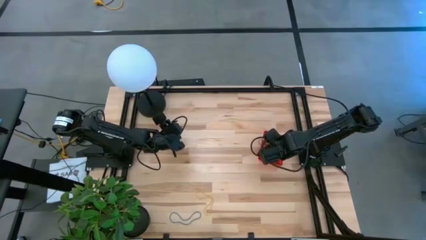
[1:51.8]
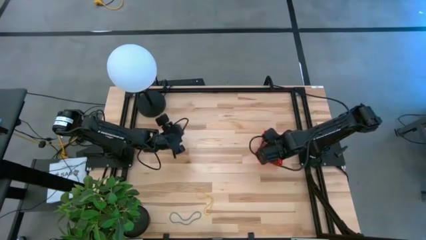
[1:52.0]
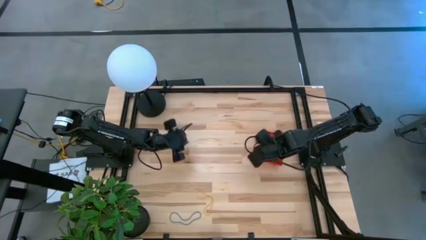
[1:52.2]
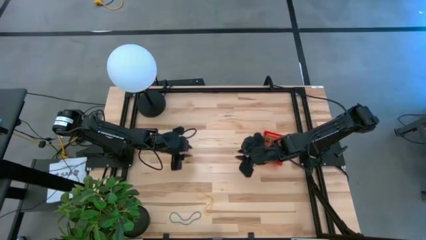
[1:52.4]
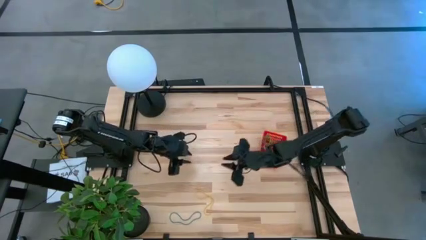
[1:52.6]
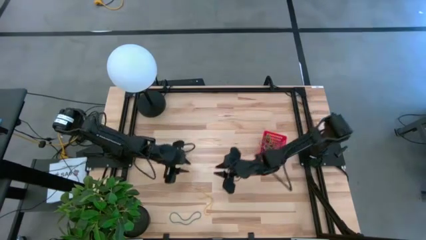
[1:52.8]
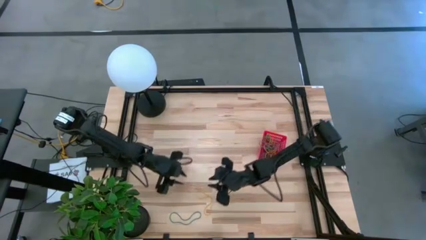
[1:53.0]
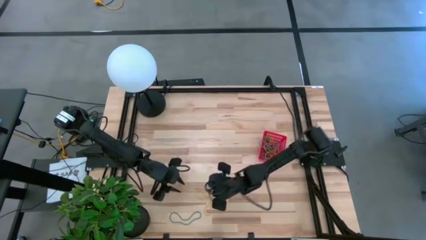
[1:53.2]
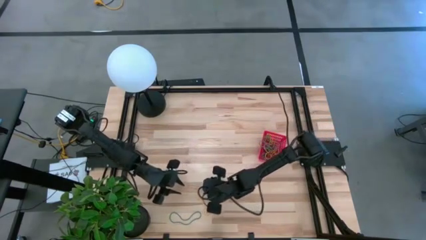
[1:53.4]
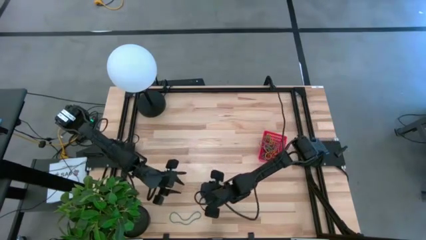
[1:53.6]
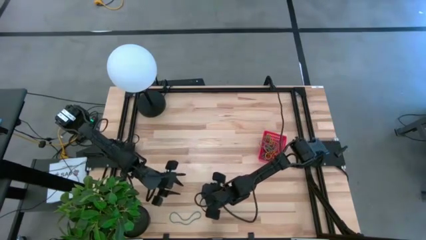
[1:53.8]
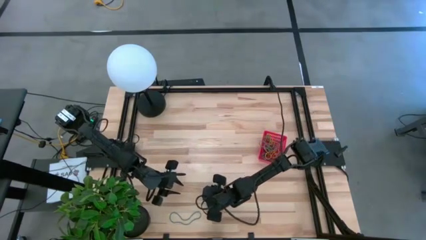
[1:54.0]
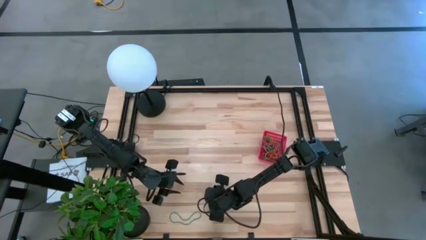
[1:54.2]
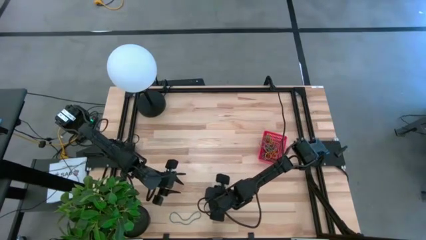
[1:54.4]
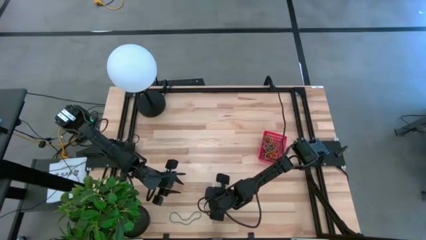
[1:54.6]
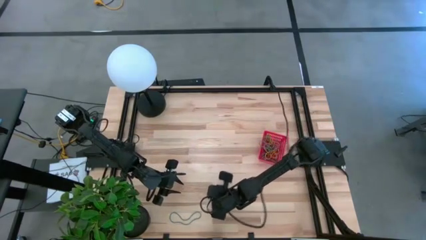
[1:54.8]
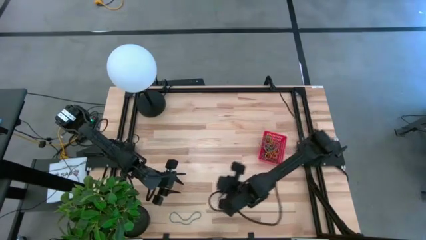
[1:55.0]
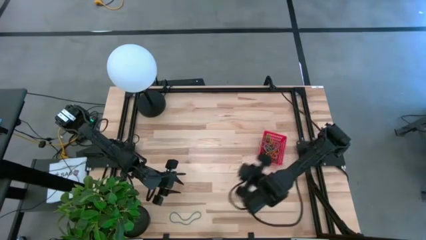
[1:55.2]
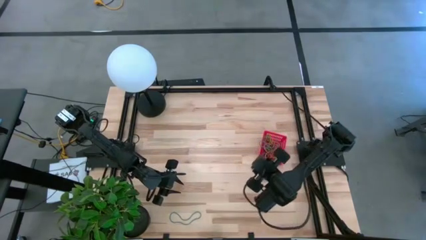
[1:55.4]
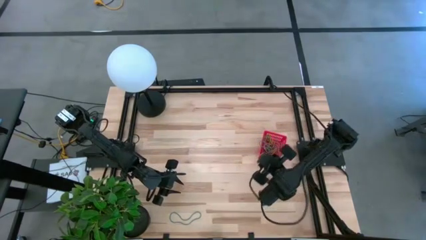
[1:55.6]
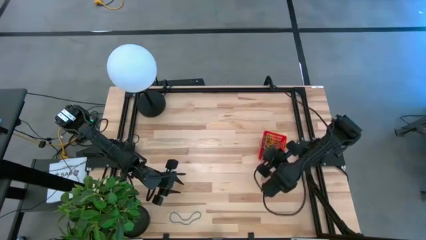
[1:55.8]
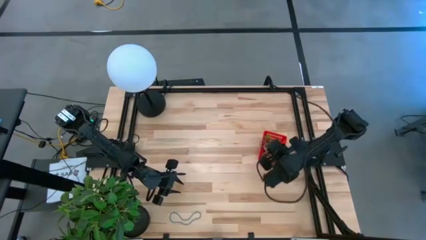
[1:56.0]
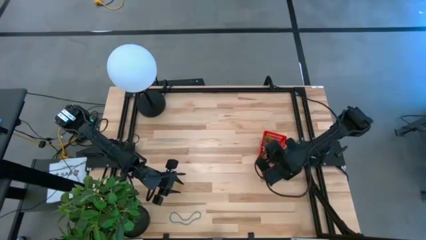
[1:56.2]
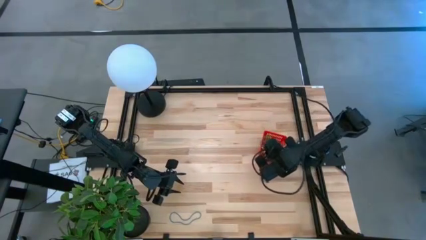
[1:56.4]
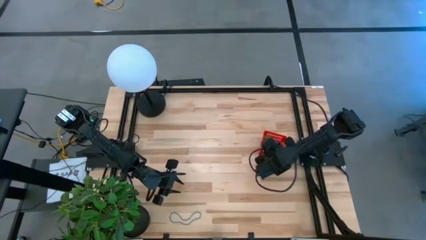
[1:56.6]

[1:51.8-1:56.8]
Task: Pick and place rubber bands into bin
Put the yellow rubber band into the basket

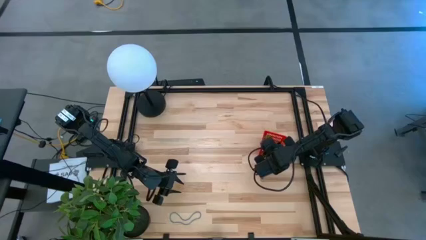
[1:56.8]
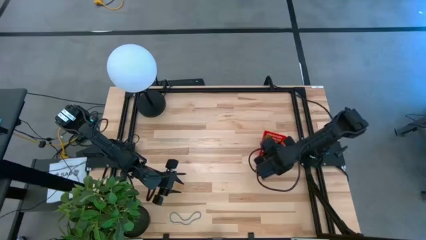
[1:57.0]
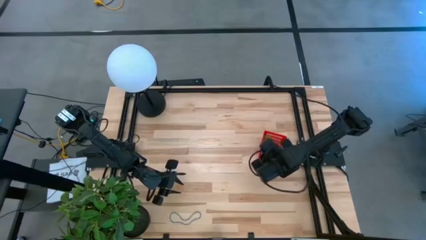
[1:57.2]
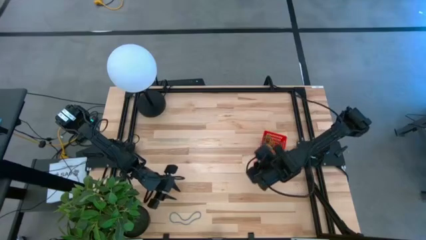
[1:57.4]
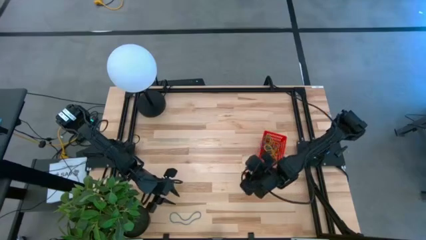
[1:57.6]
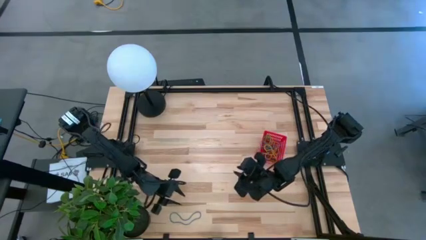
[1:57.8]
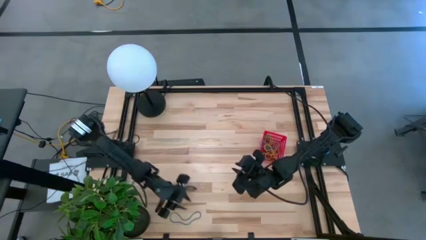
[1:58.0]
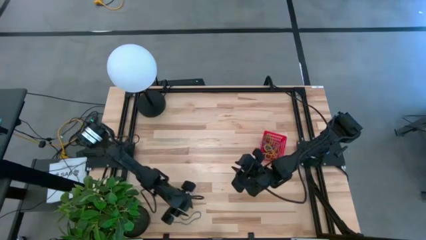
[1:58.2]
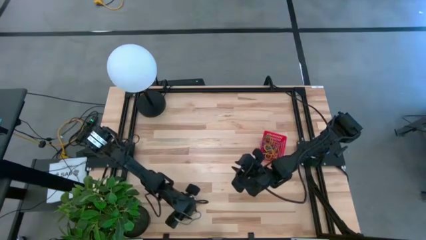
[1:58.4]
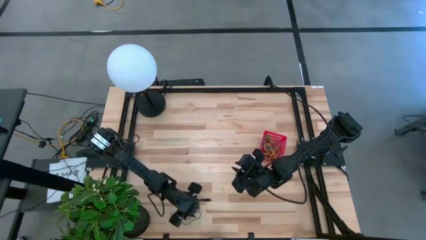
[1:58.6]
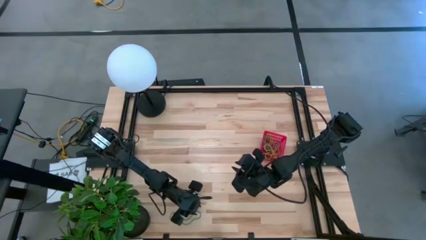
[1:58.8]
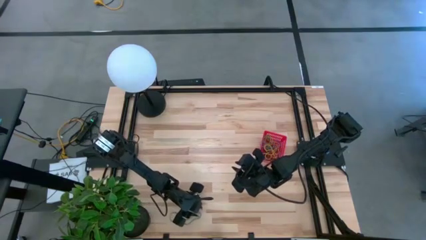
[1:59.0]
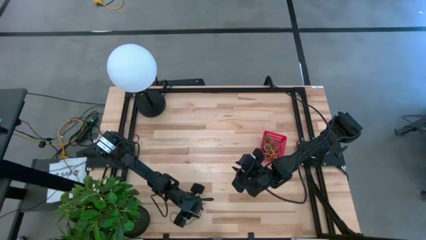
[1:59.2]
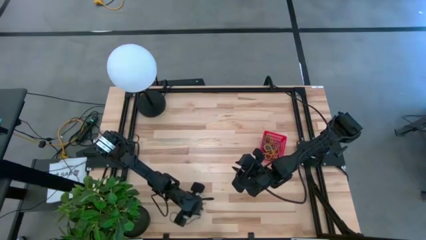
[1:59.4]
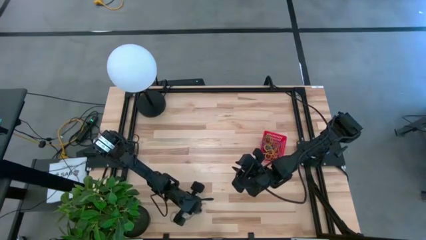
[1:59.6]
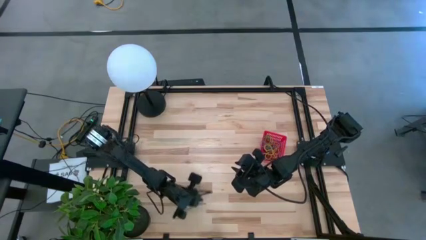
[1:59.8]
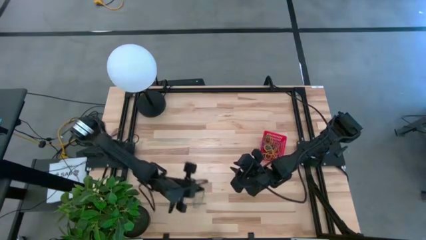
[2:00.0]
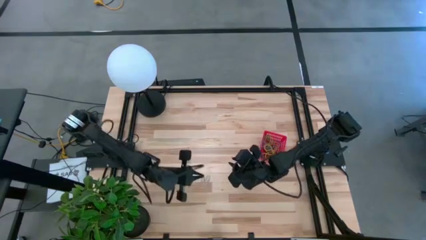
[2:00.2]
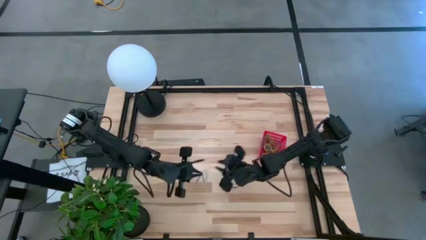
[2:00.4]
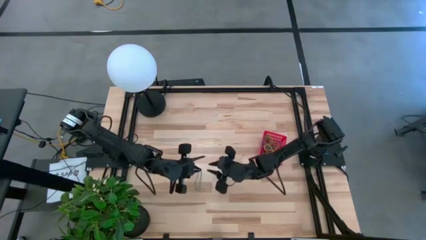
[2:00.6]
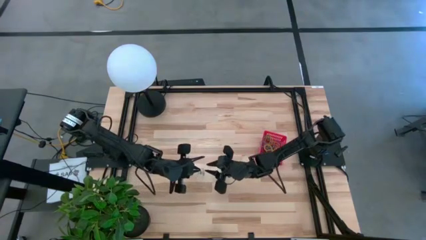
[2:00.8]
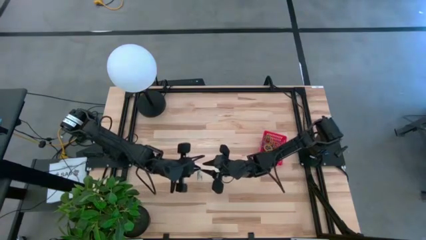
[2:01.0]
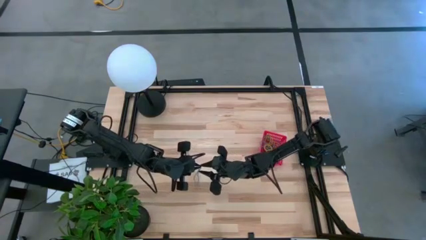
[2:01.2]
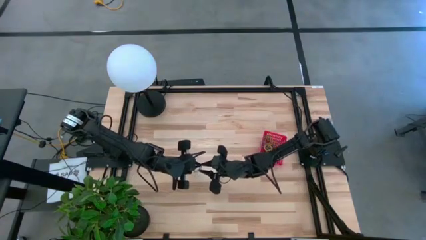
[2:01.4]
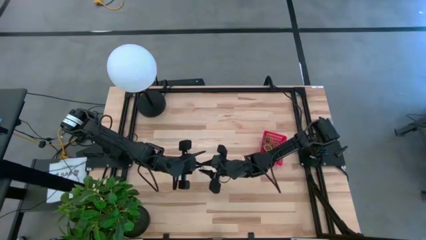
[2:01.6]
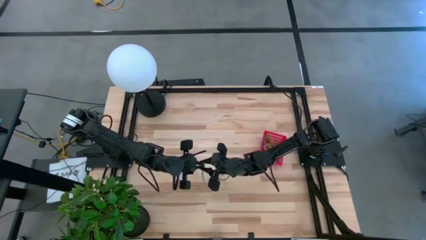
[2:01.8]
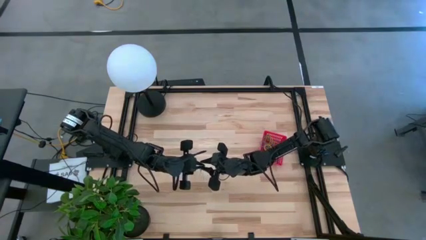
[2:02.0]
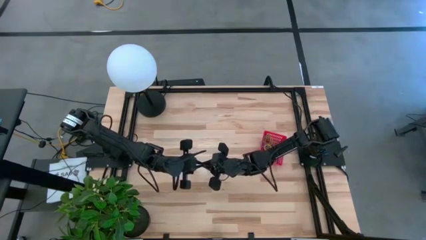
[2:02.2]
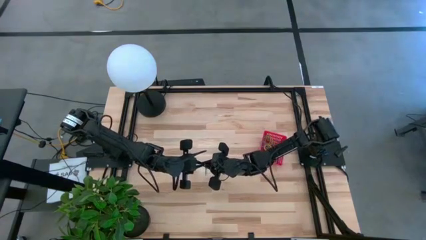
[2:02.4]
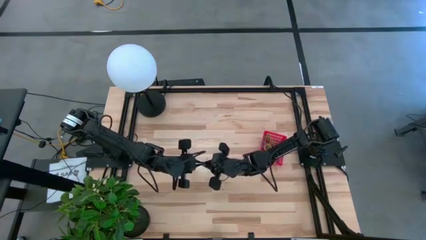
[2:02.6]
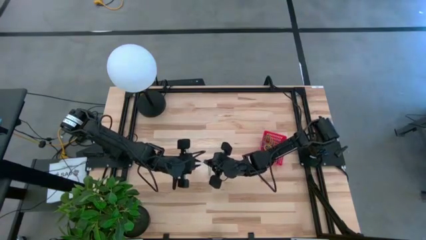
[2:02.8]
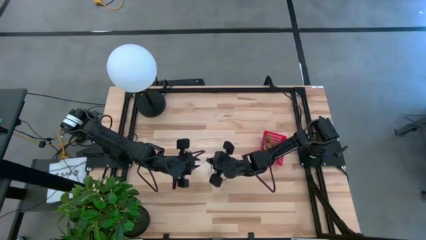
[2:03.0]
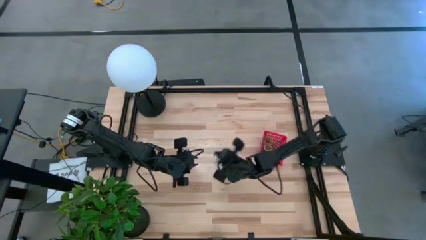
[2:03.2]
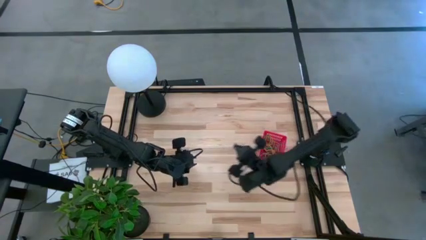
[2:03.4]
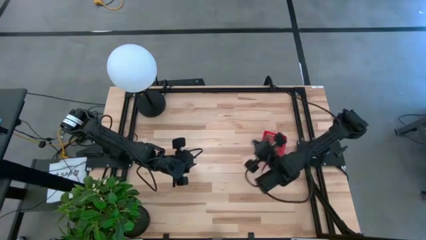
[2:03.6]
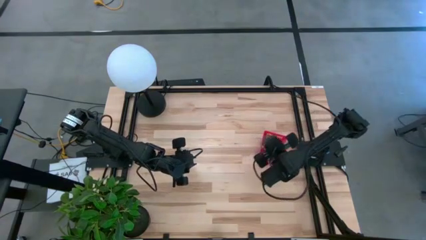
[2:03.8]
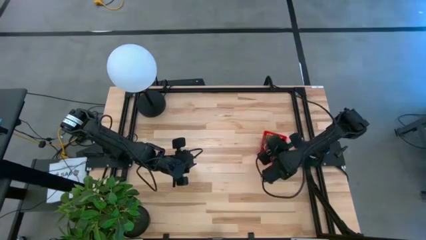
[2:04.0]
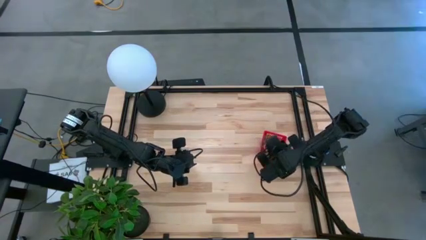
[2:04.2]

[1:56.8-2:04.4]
Put the blue rubber band into the basket

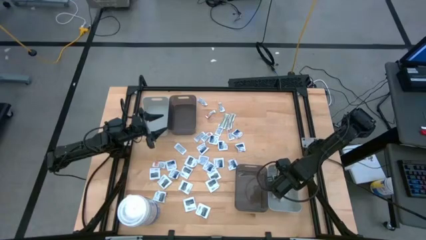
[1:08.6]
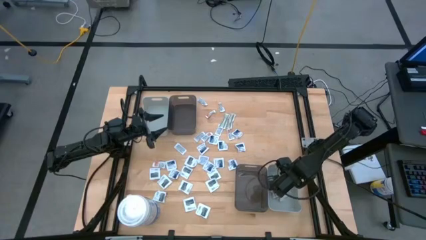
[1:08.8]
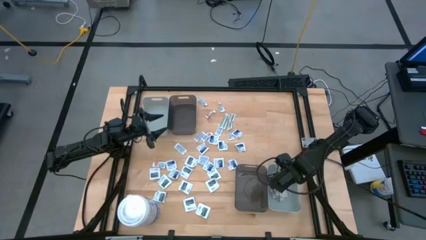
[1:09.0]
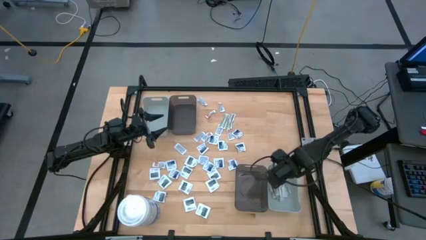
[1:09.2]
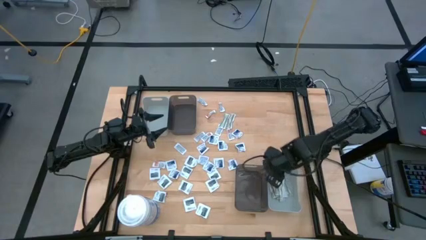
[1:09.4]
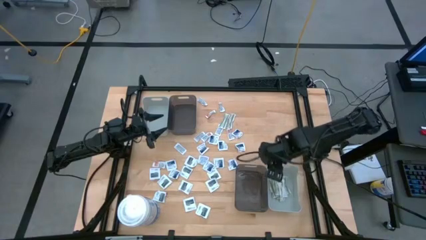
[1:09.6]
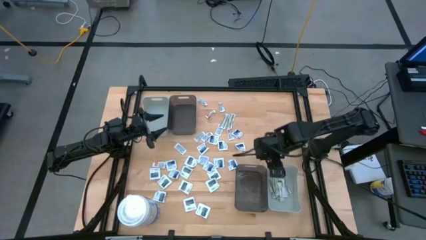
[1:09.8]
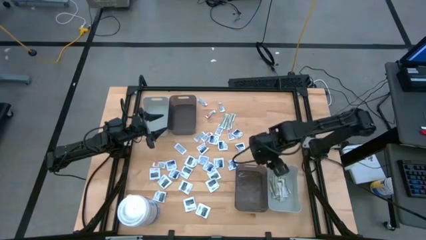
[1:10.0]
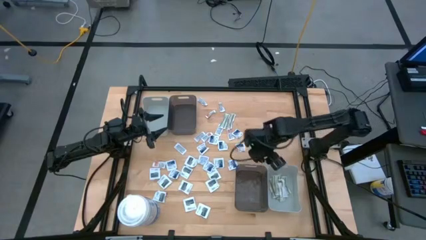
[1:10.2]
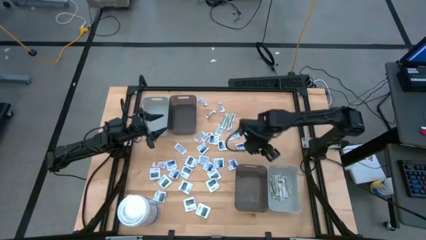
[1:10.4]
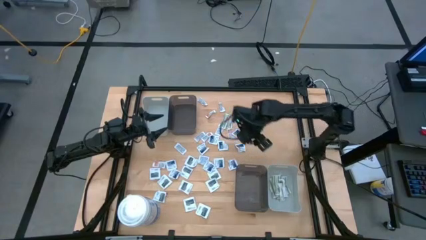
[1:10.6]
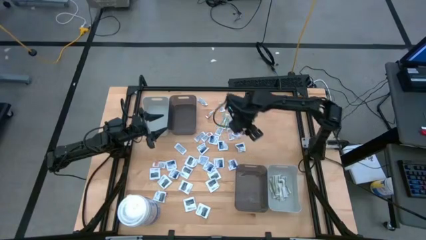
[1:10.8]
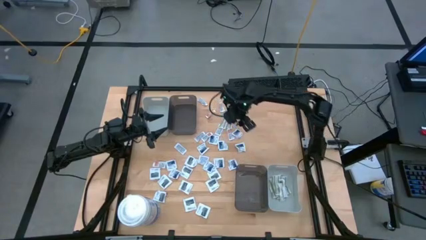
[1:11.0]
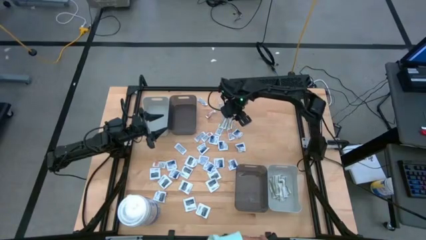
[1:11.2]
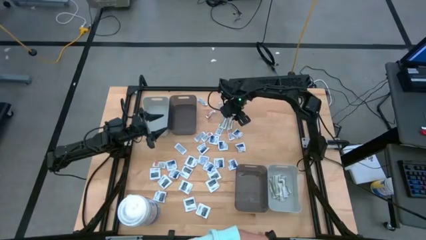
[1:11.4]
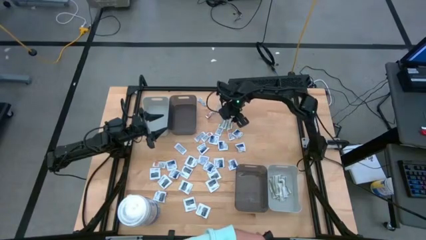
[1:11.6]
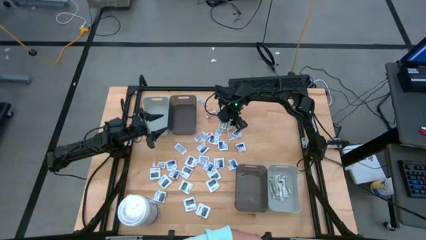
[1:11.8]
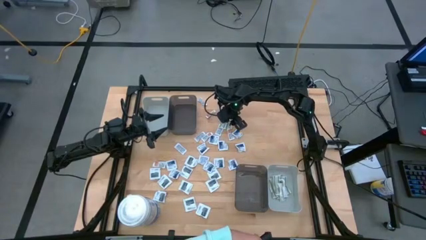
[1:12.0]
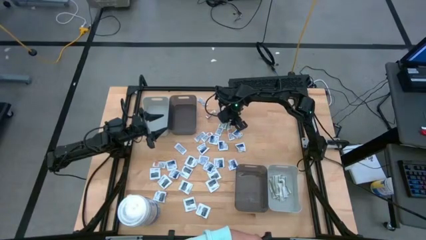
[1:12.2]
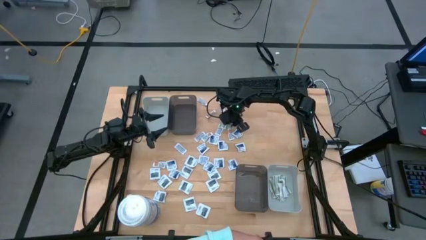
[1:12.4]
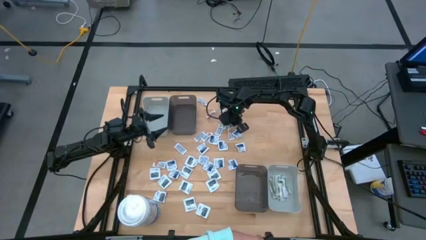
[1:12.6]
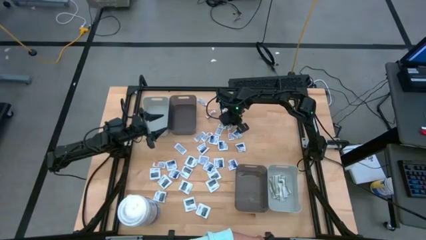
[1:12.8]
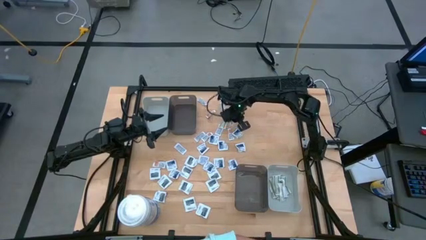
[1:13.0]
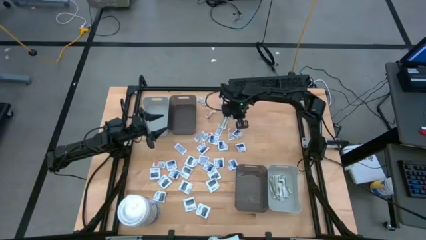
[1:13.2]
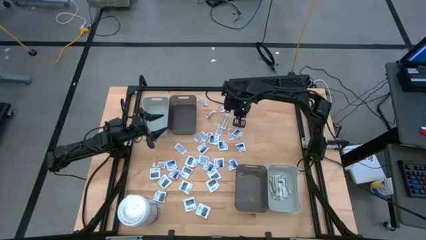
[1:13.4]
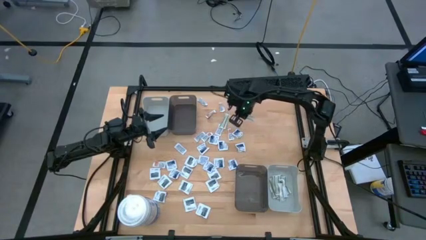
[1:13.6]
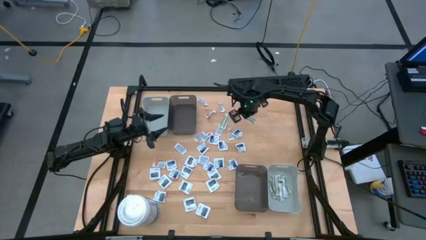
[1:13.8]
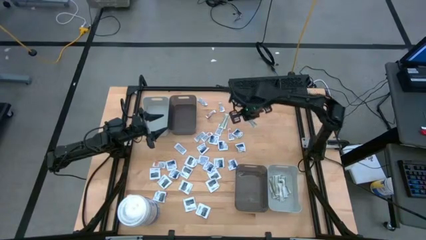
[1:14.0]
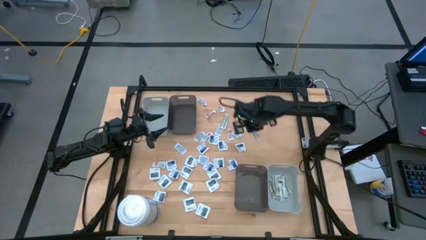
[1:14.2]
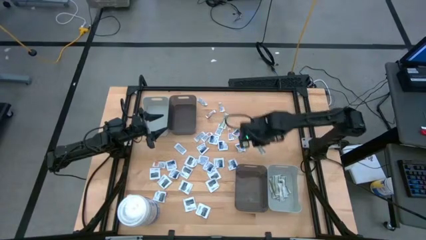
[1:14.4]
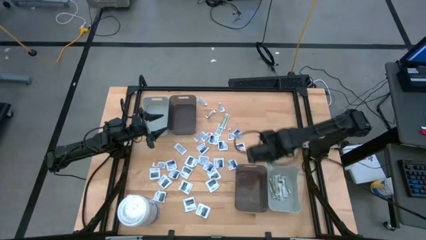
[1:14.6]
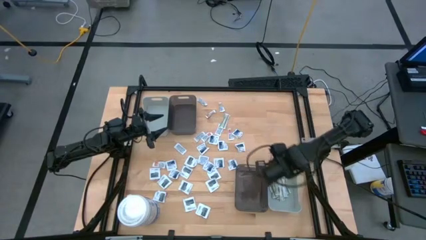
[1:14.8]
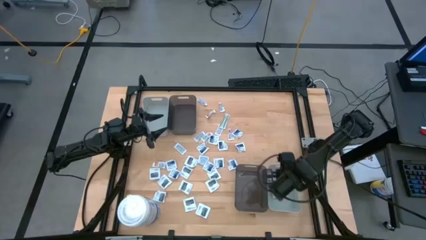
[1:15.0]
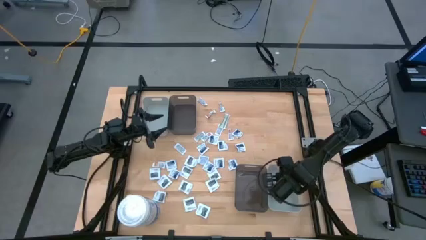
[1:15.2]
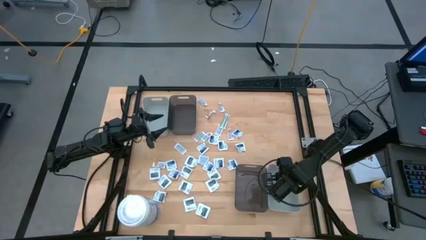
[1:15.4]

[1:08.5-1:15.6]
Task: Pick & Place First Aid Supplies
Put the white bandage pack into the bottom gray bin
